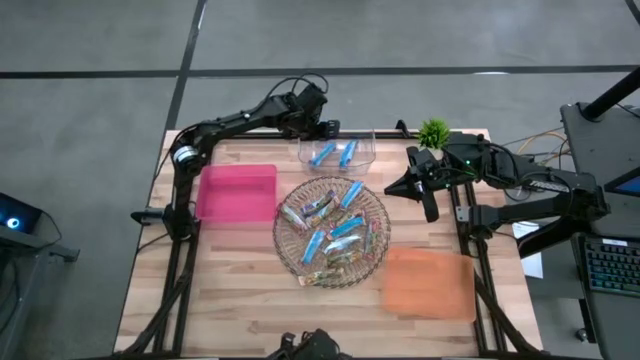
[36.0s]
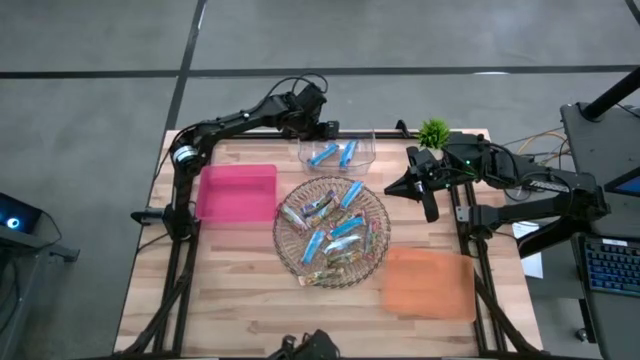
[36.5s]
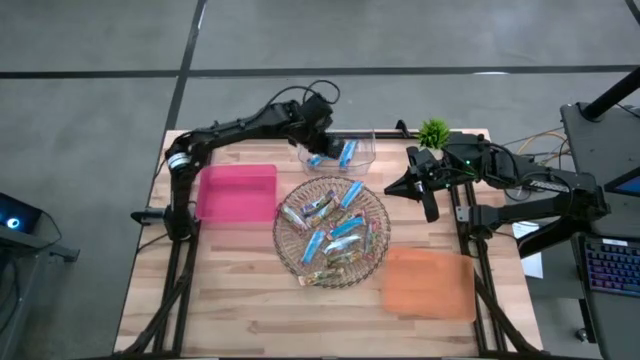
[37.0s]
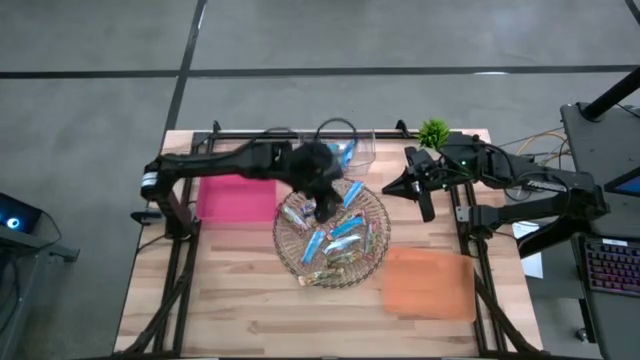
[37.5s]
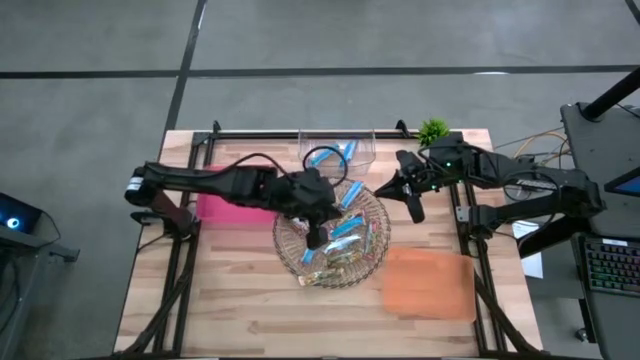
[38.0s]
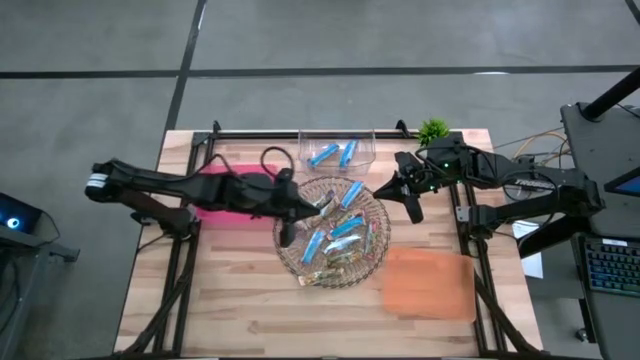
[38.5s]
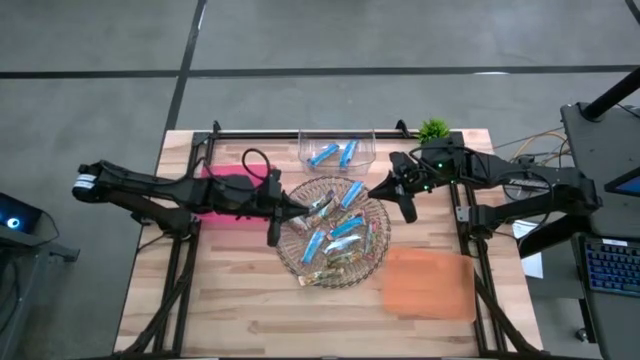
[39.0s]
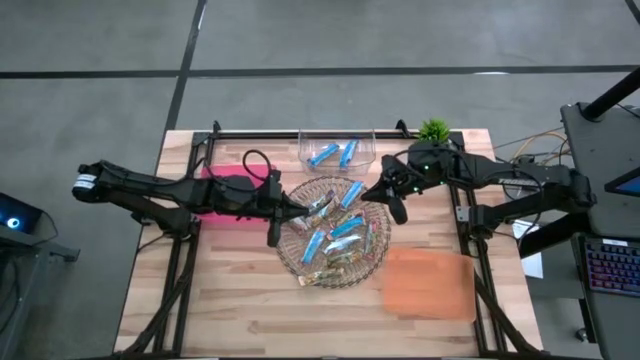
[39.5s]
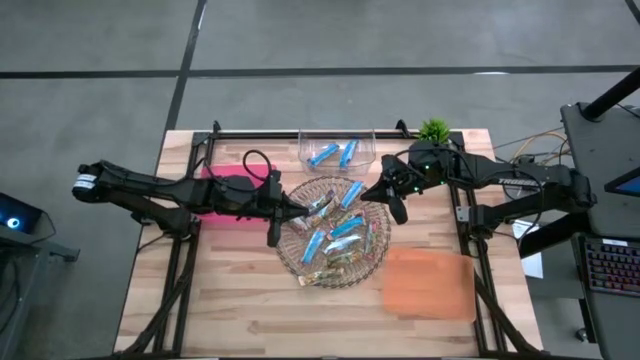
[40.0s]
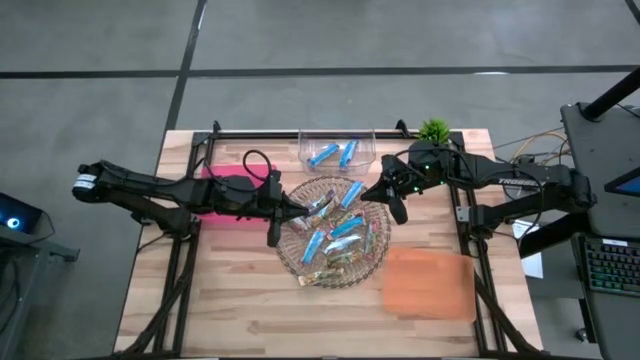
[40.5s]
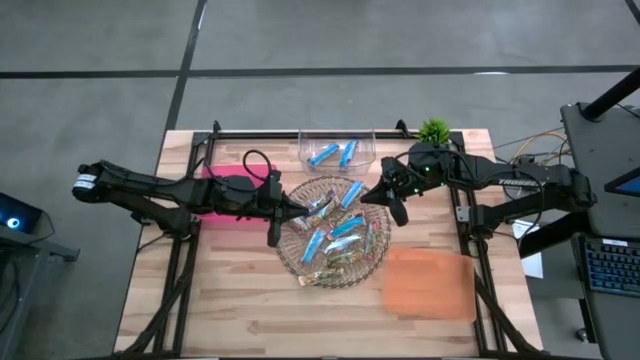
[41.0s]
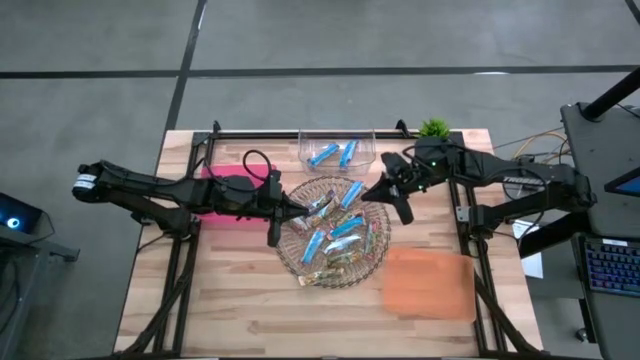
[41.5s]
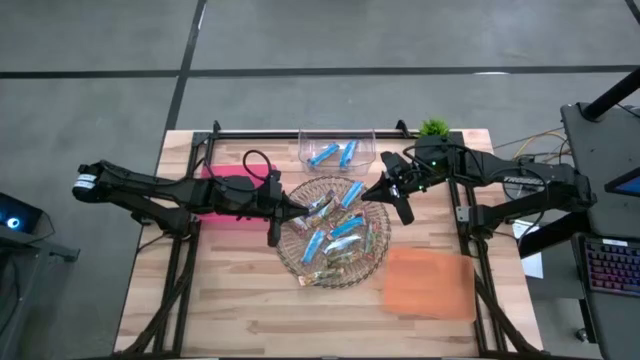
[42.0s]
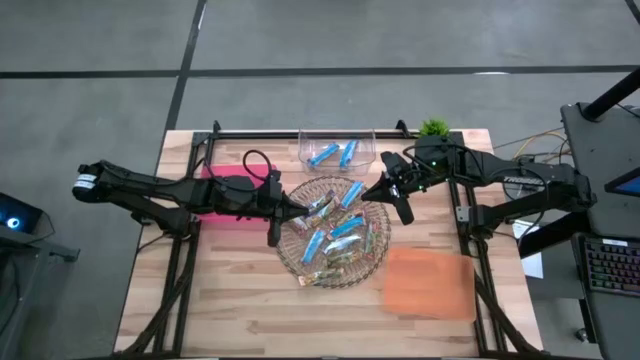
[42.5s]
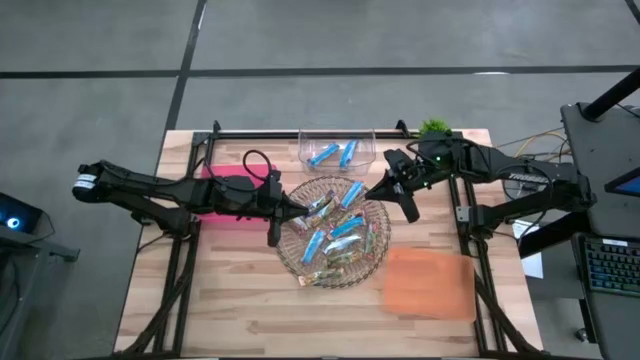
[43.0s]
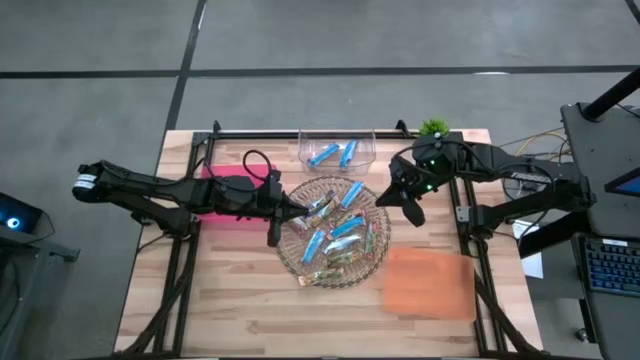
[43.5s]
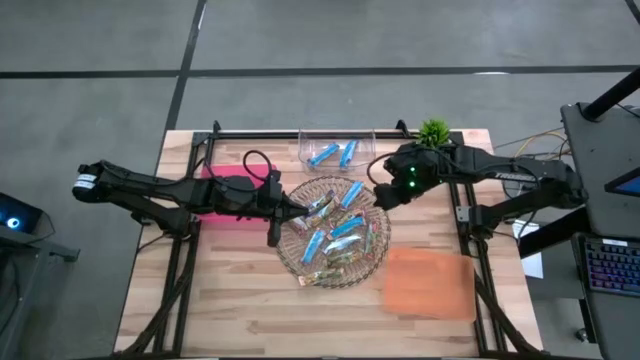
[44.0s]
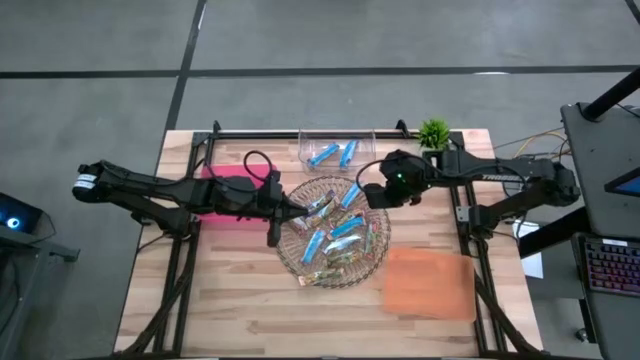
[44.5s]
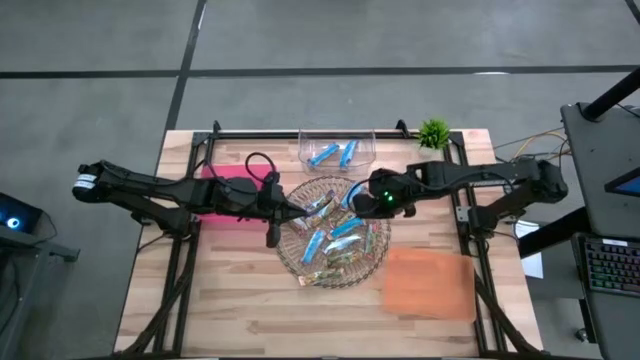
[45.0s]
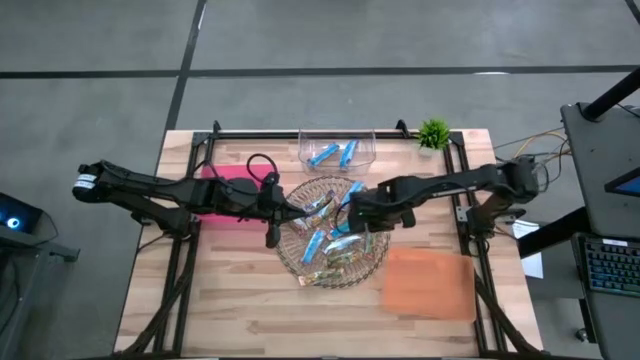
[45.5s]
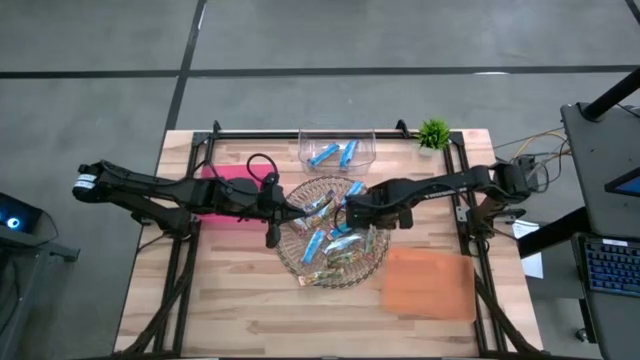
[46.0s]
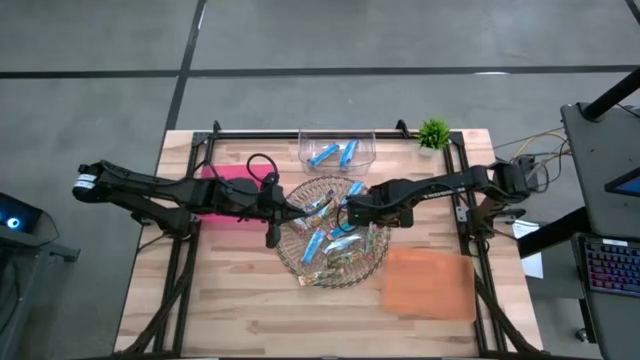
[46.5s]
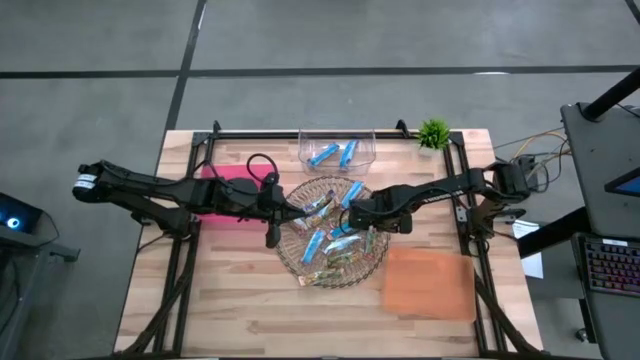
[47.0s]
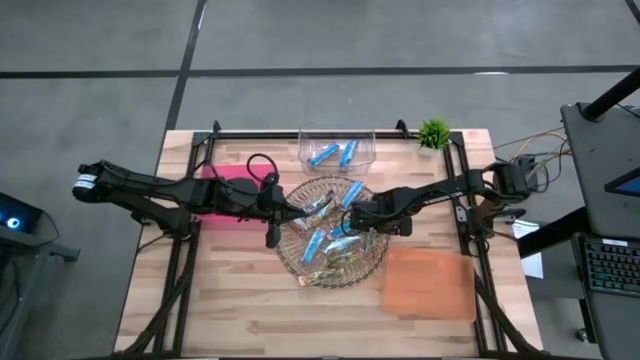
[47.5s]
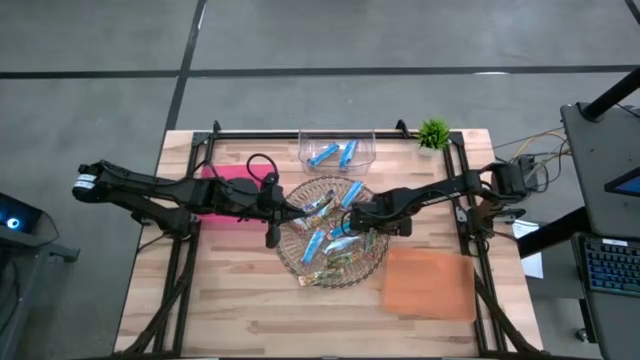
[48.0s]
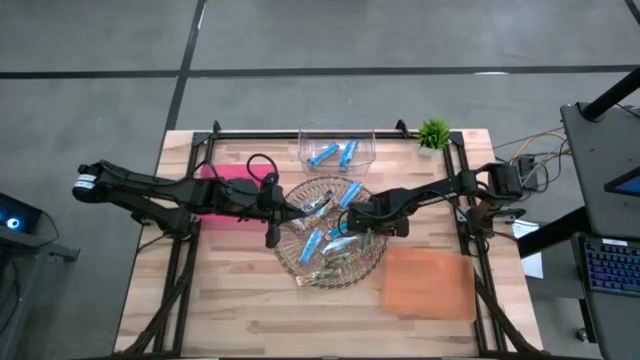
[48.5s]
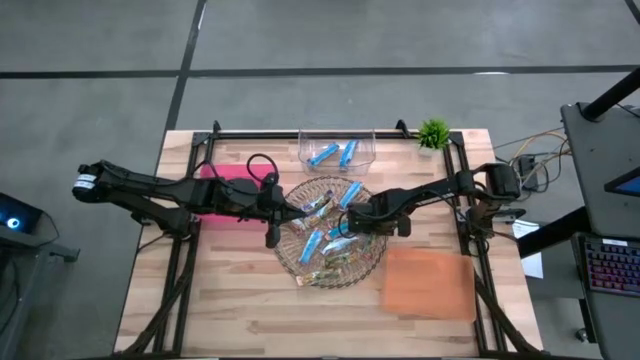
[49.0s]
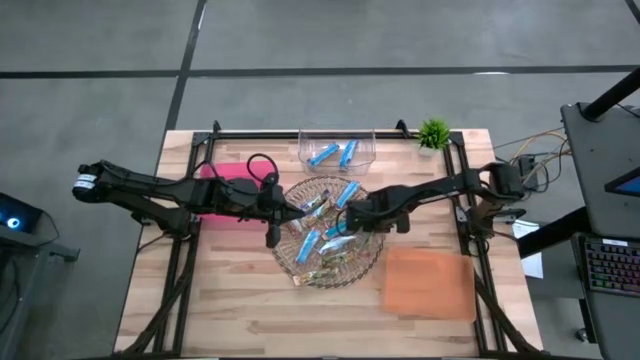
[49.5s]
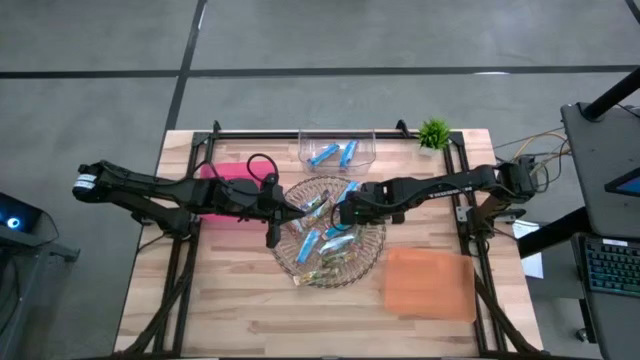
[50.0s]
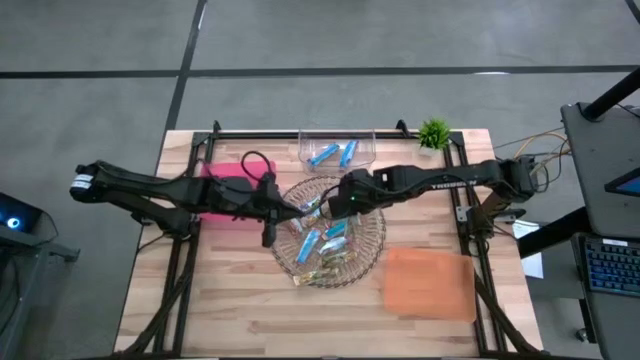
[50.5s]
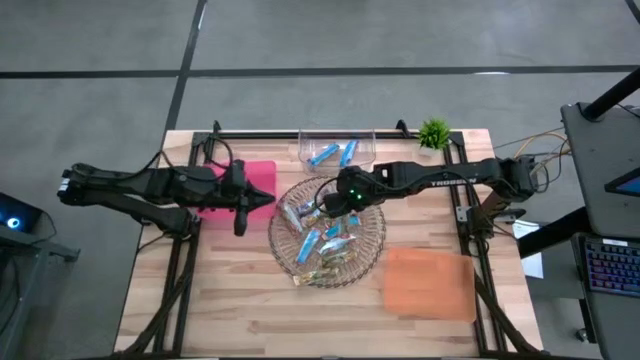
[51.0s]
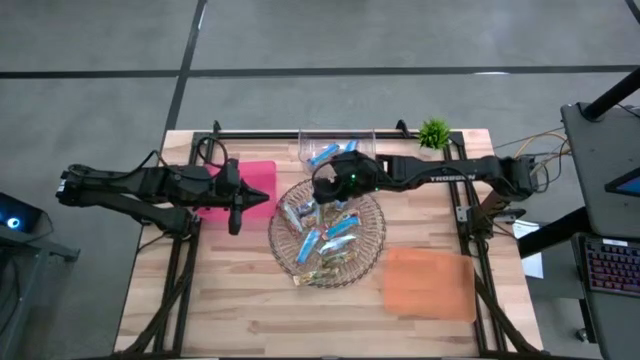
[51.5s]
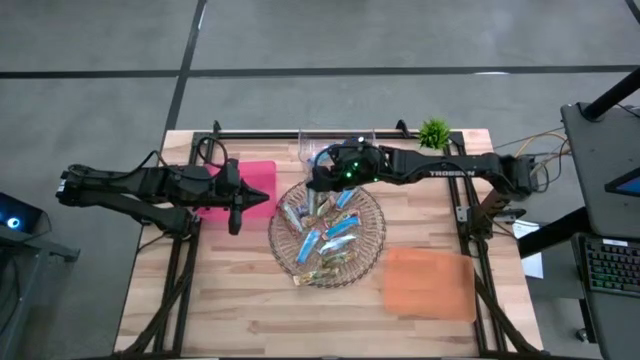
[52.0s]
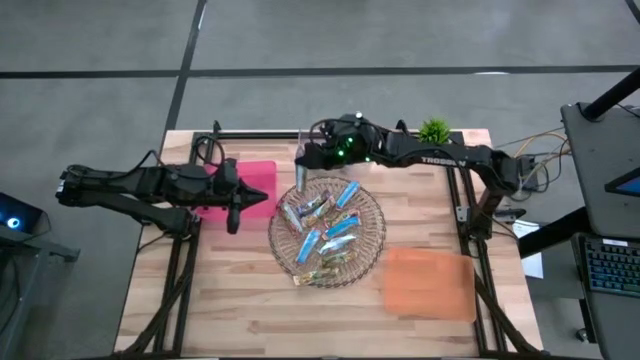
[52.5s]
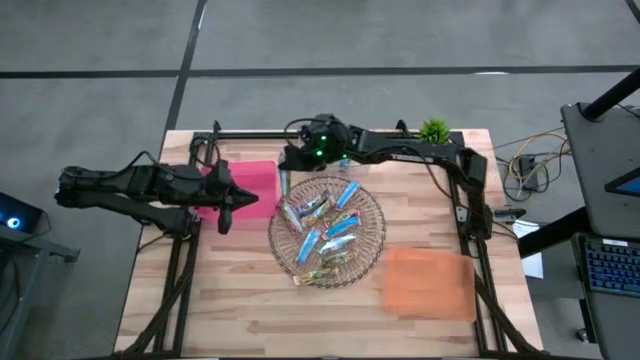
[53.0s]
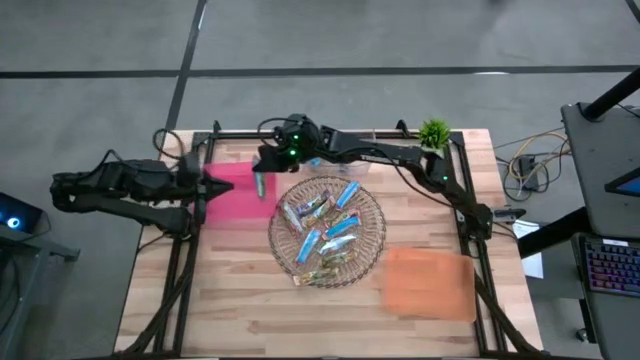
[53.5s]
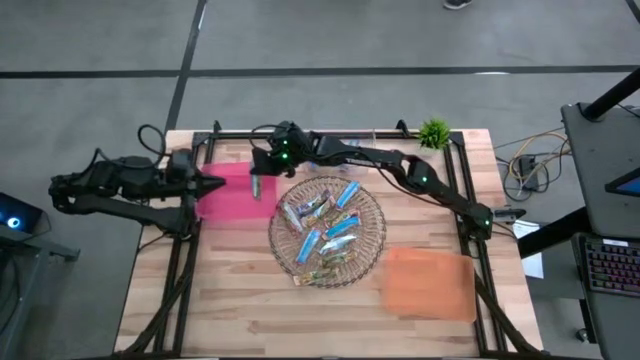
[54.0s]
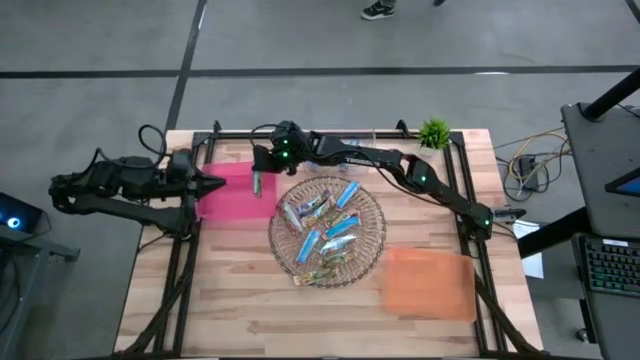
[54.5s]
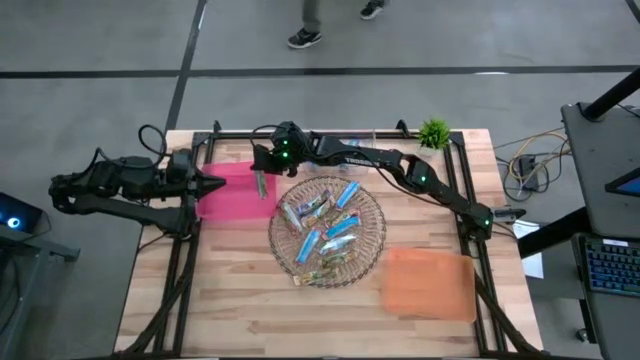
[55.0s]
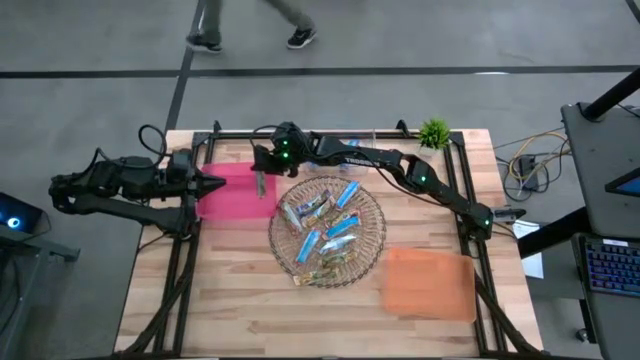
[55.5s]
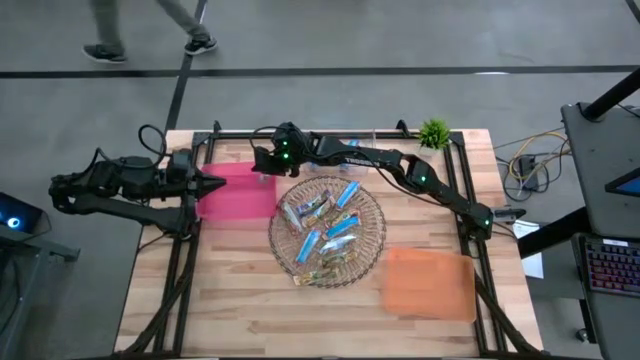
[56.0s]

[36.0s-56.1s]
Task: Pick and place Granola Bars by type
Put the red granola bar into the red bin

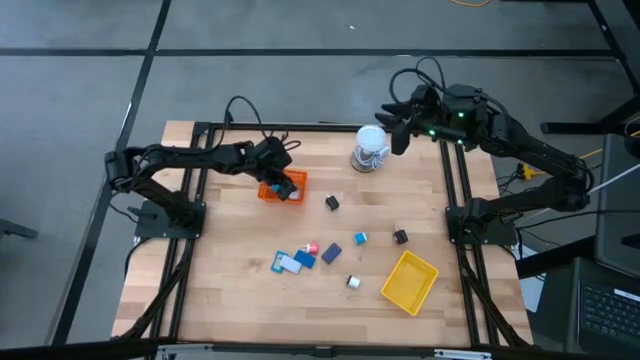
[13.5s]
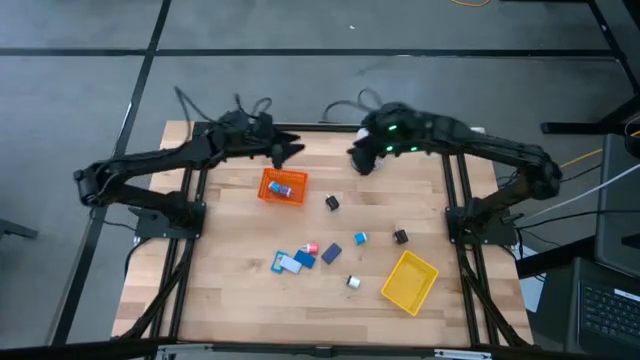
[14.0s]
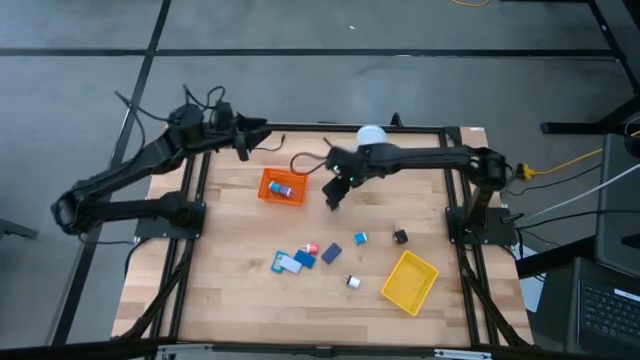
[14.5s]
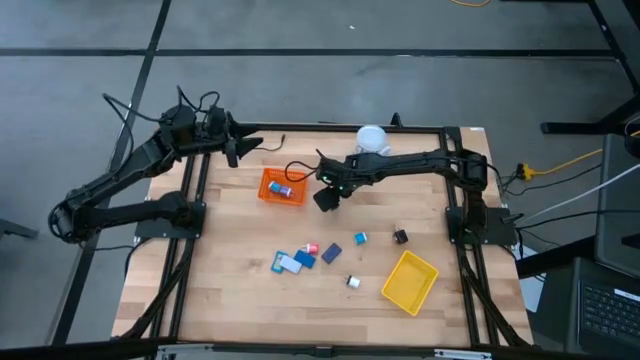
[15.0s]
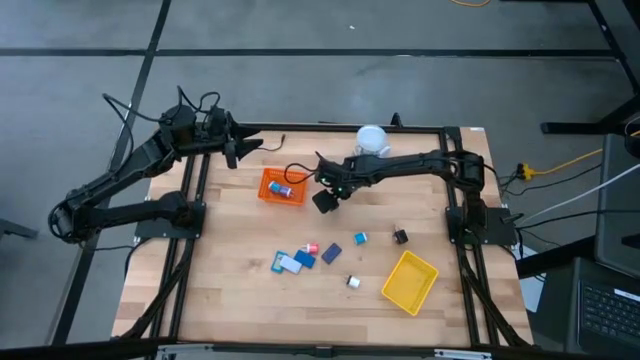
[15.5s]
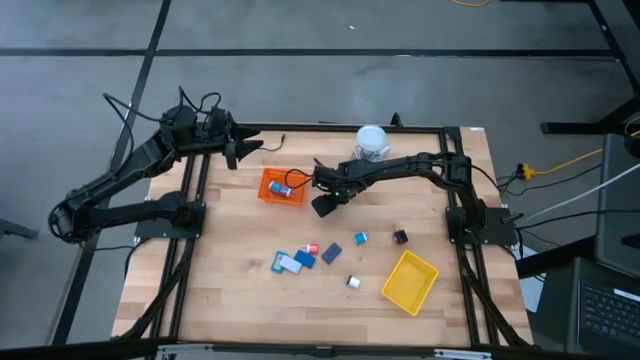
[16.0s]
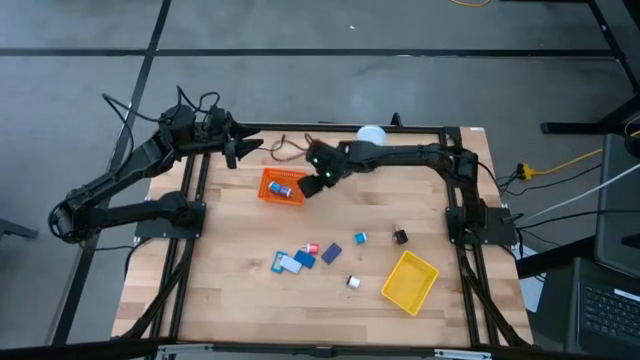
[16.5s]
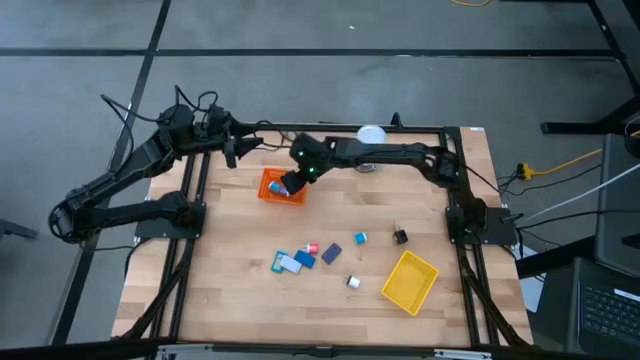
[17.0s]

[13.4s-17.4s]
Task: Pick & Place Office items
Put the top black charger adapter into the orange basket
